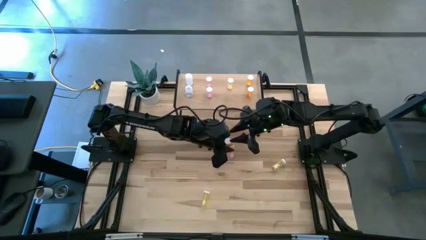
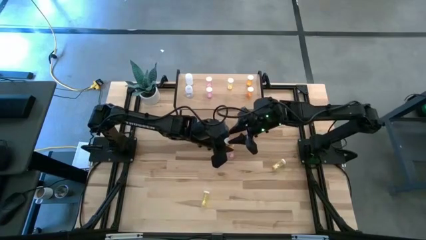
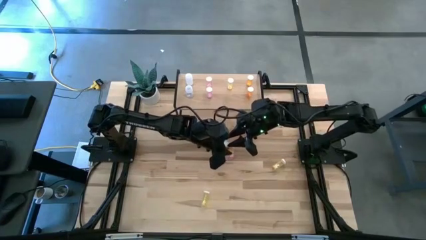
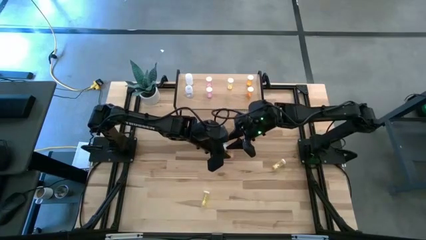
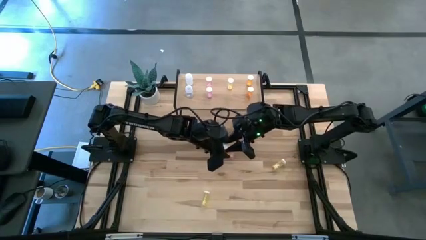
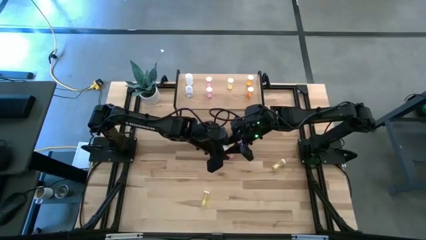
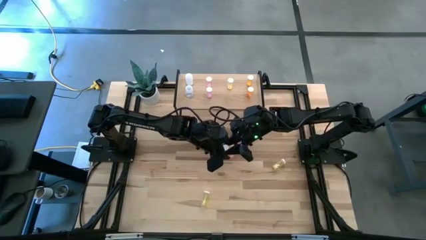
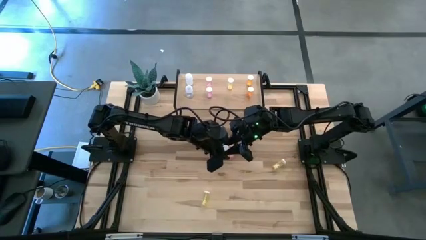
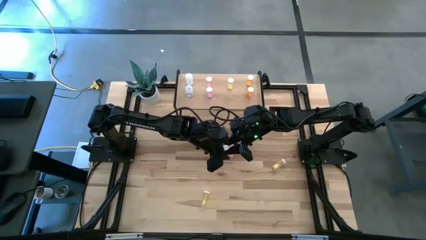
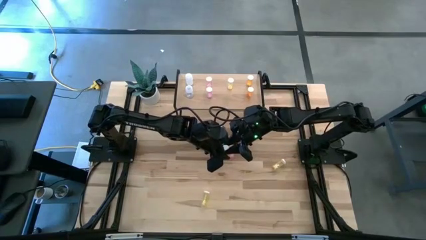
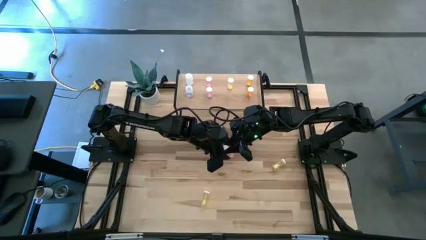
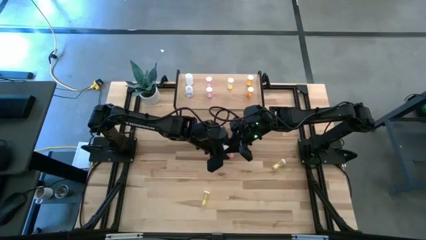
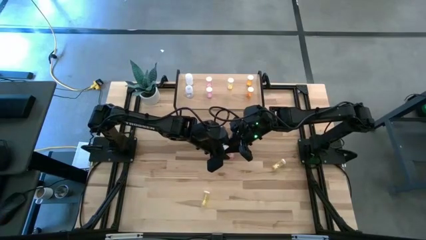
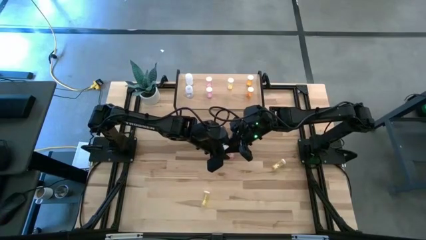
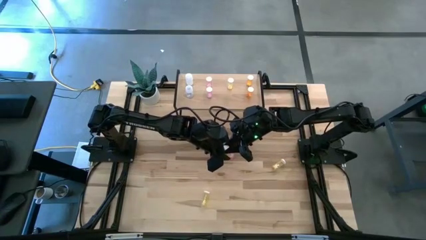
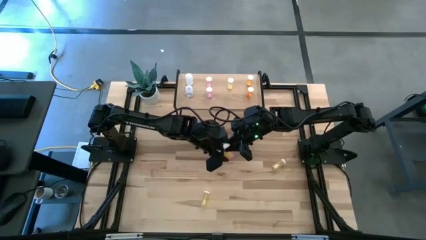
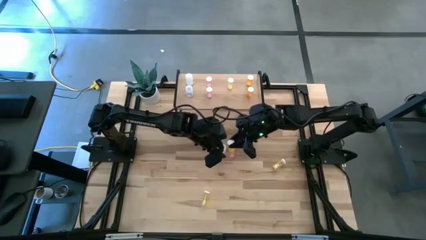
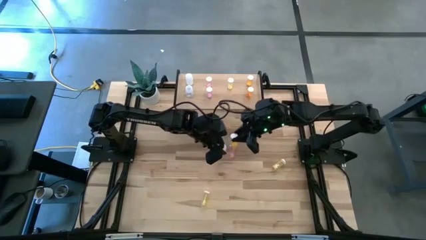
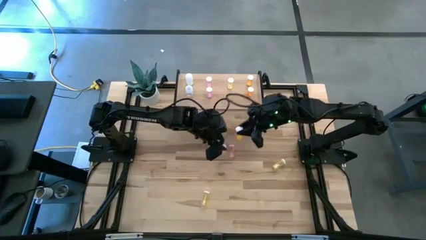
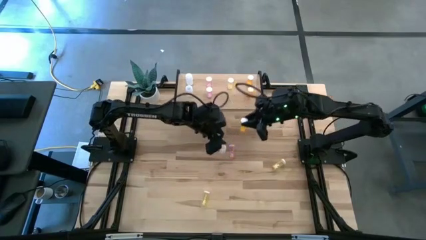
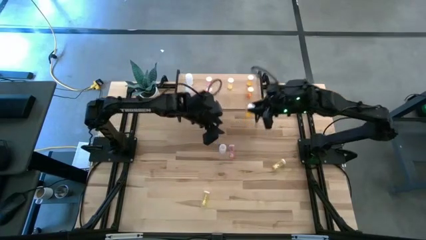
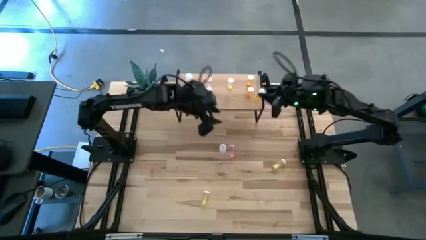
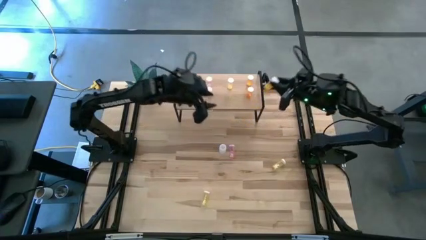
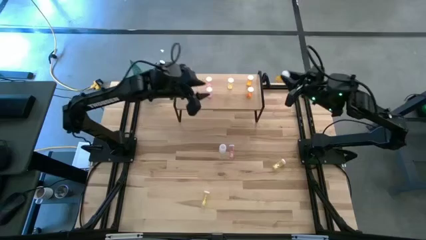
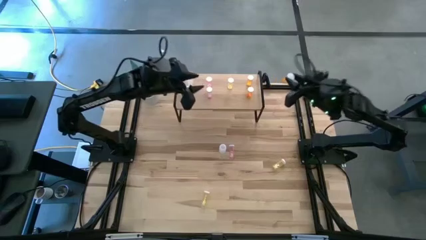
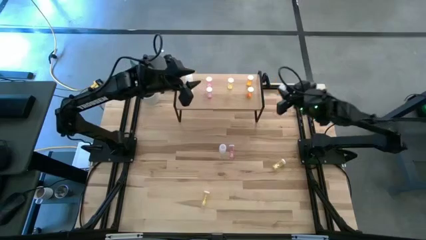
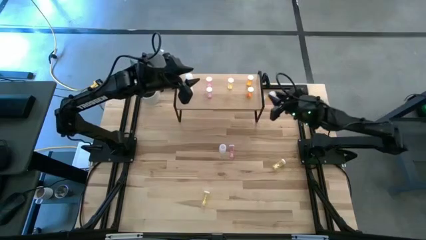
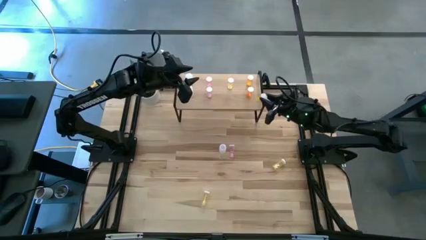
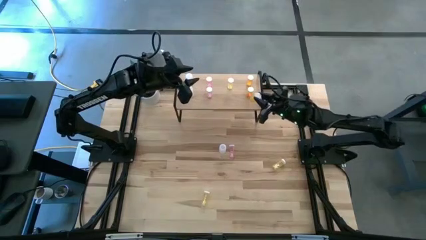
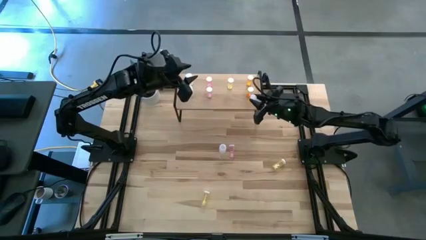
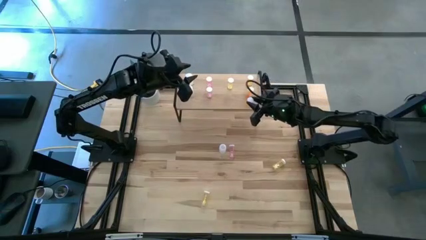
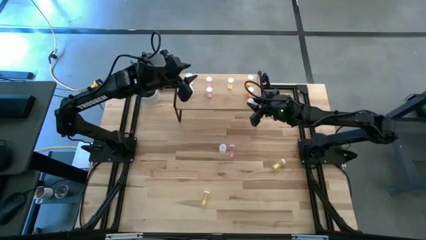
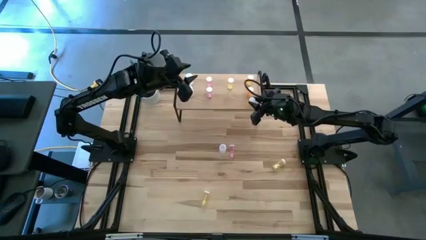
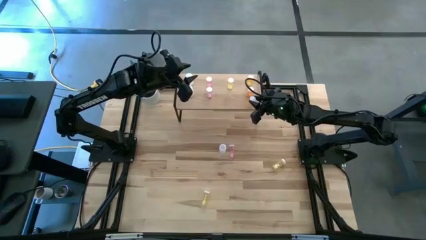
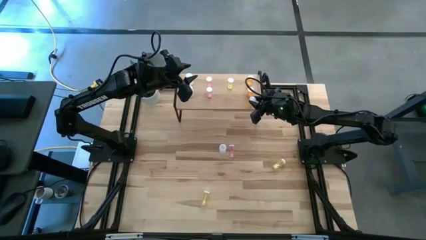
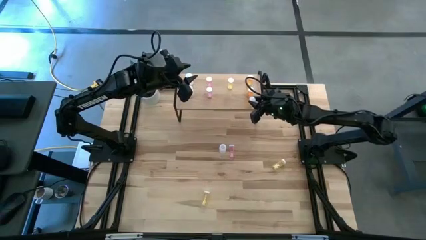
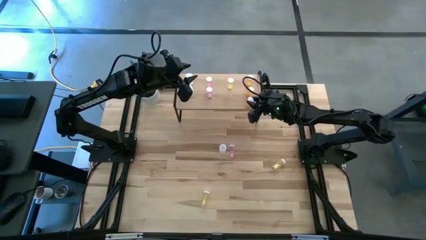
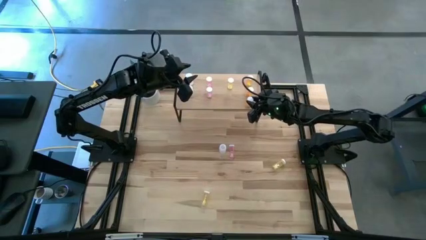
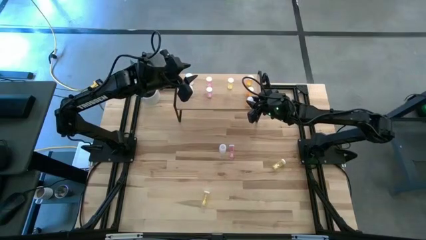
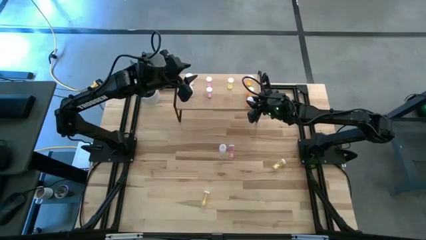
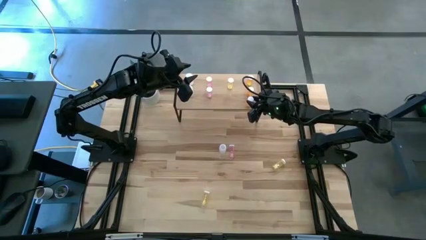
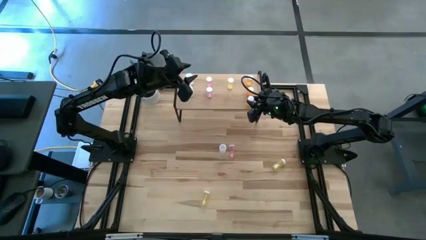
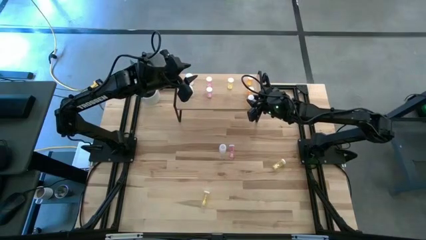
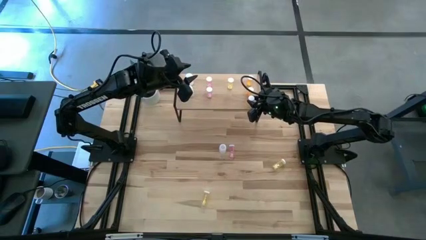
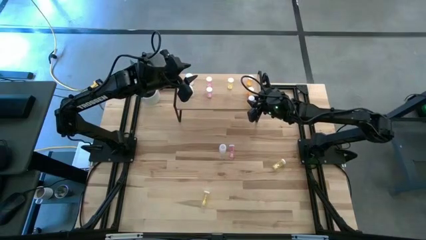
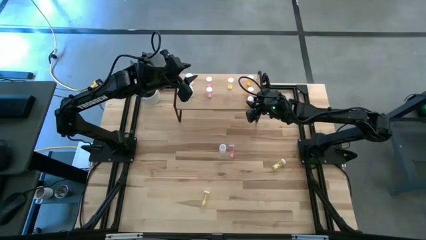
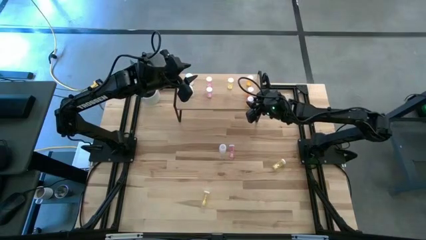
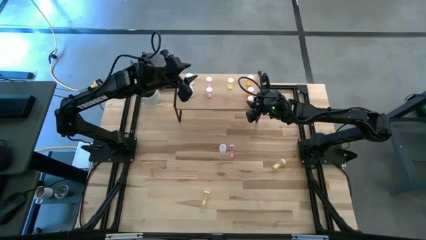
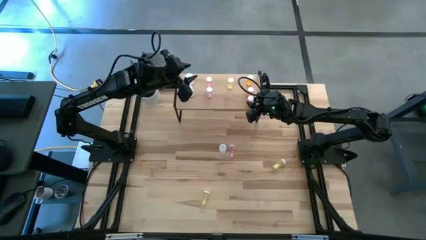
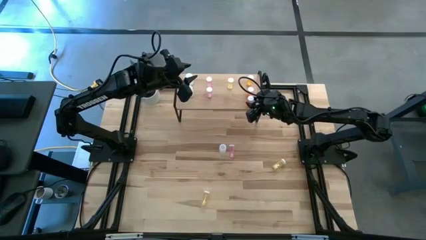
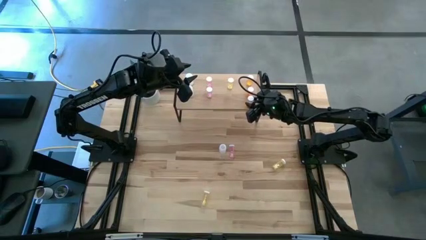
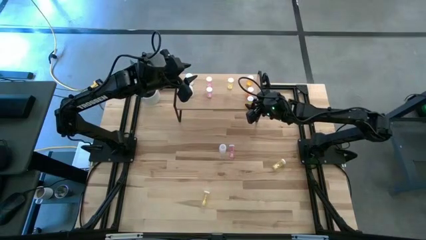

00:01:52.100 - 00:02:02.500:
Task: Pick and place medicine bottles onto shelf by color
Put the orange pill bottle aligned with the other orange pill bottles on the shelf
